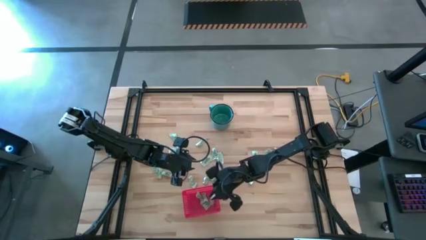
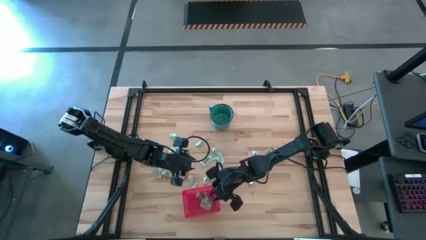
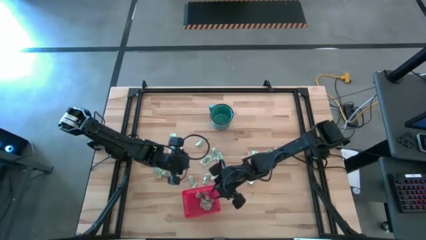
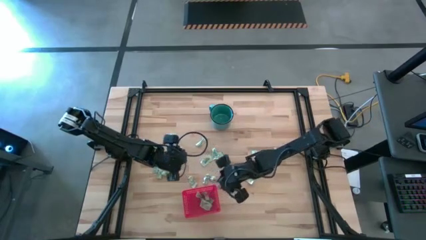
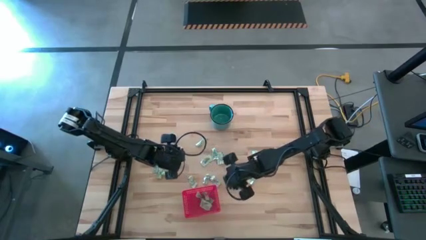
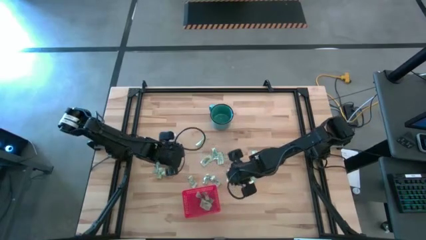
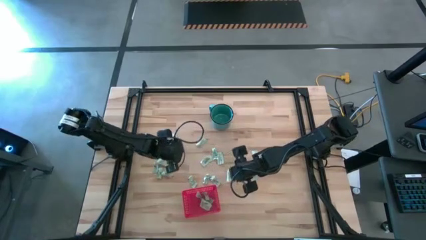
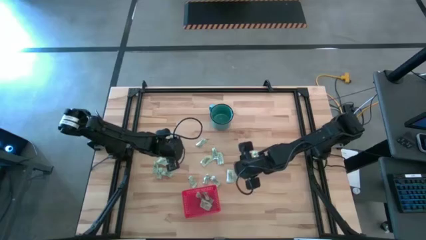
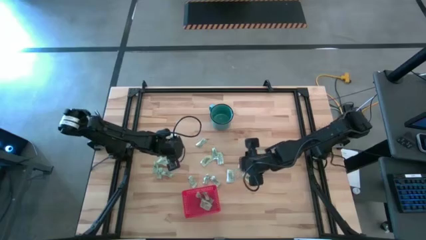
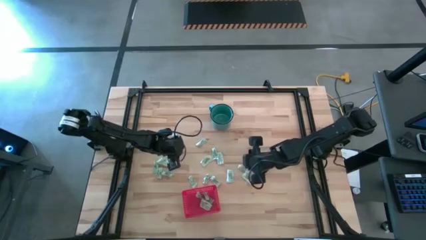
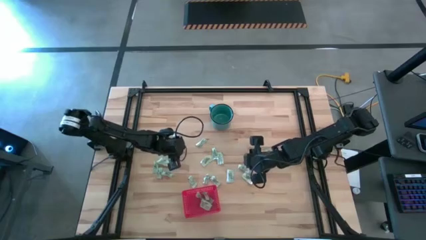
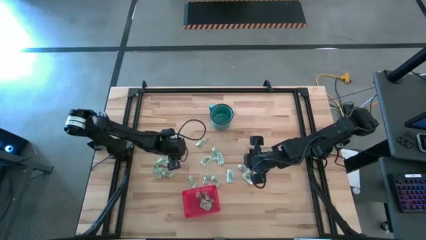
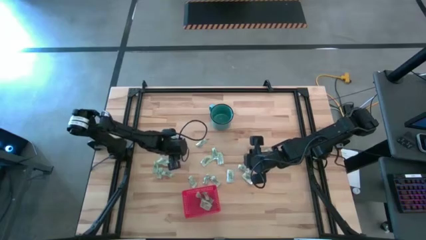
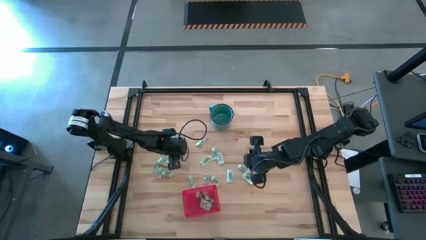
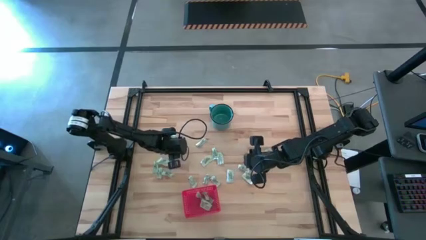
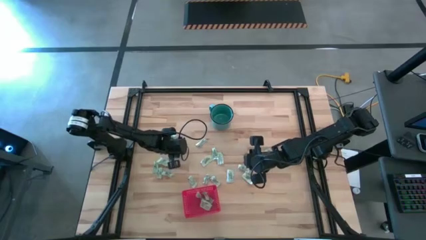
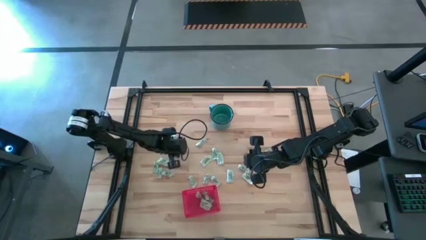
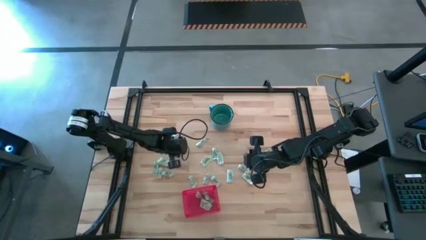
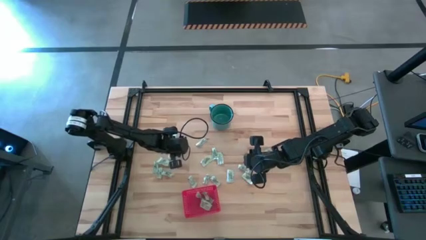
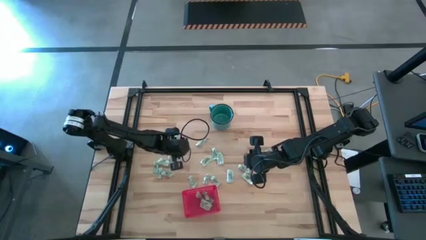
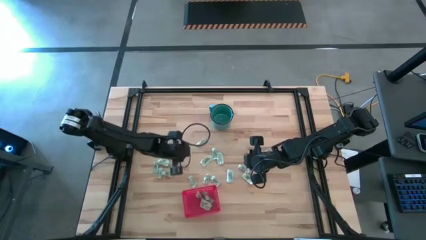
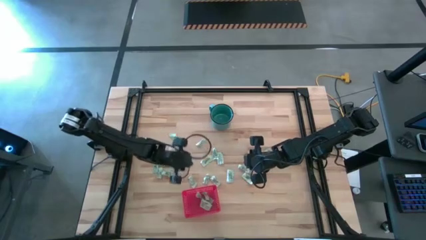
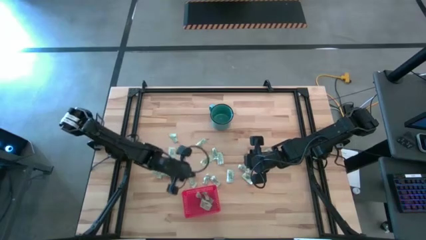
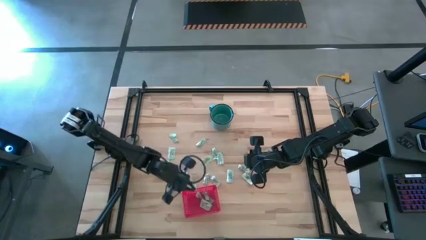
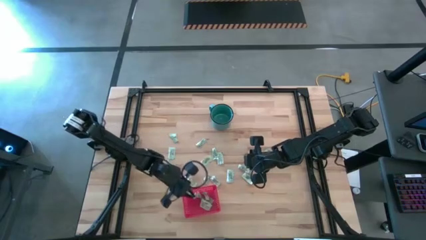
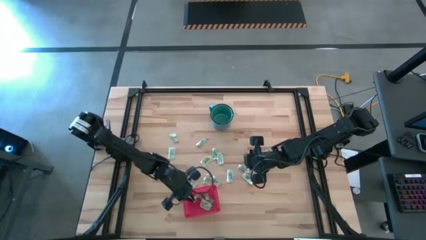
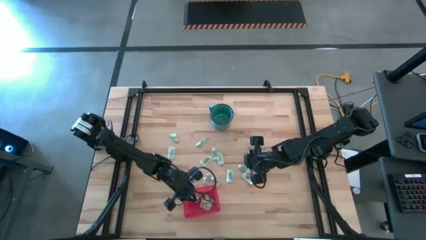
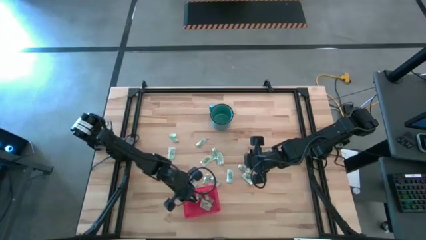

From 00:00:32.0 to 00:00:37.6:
Task: Pick and place items into bin
Put the green stevia packet into the red bin

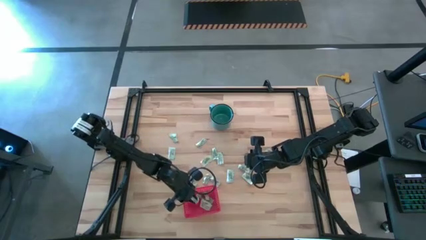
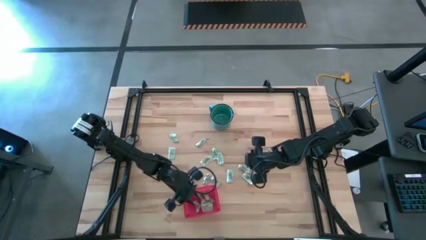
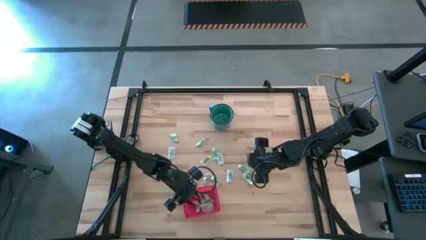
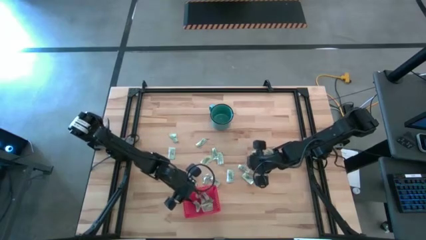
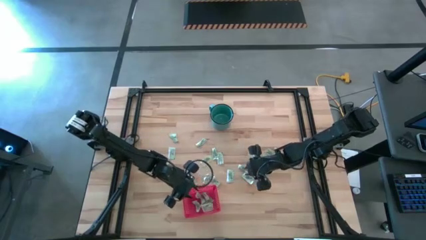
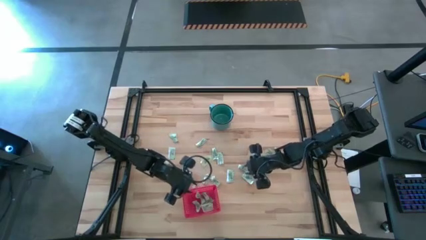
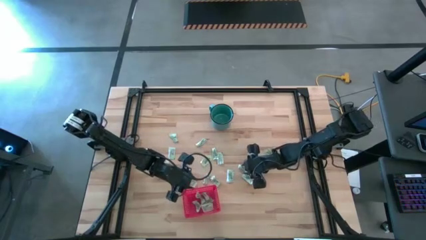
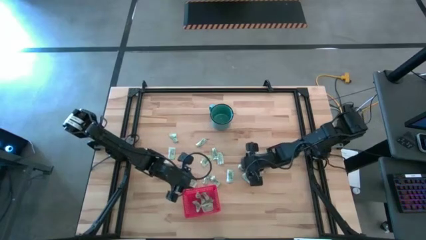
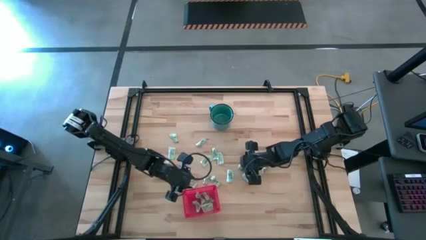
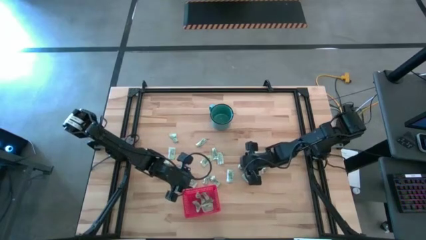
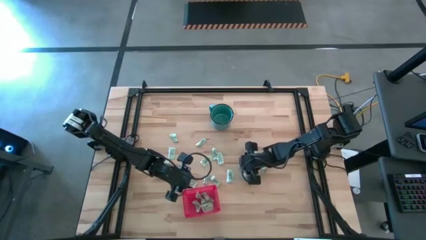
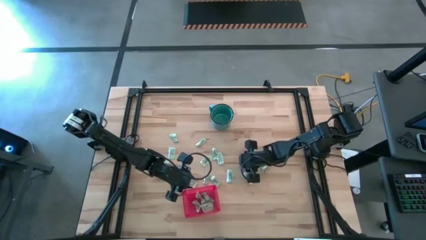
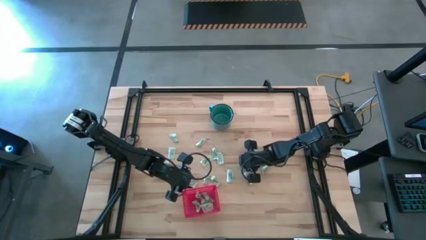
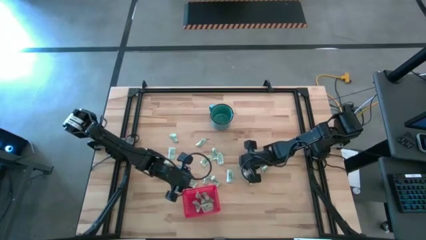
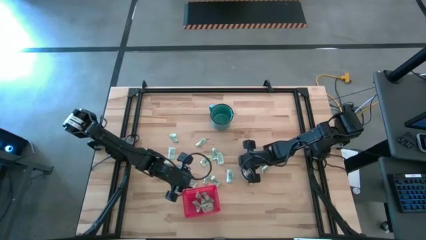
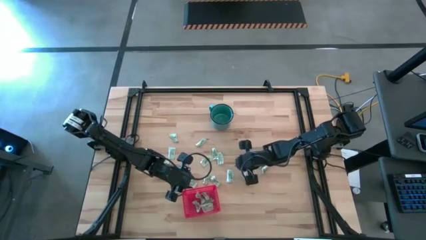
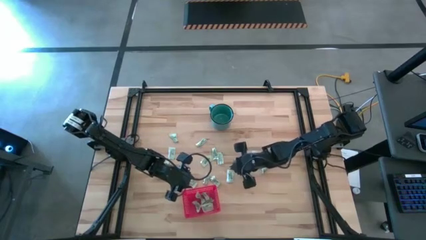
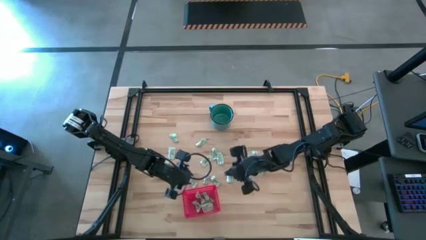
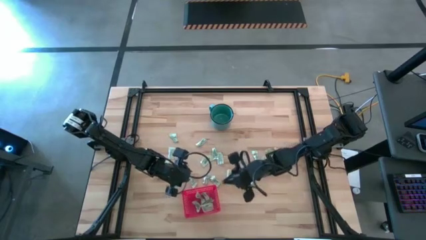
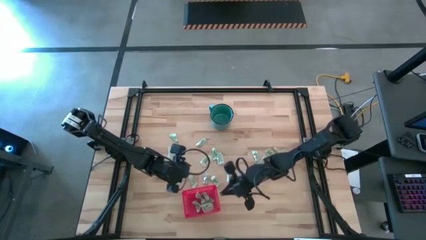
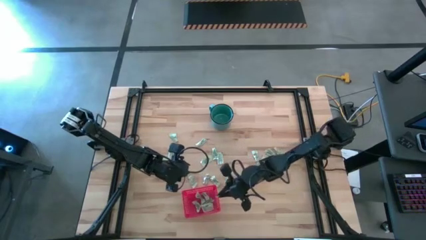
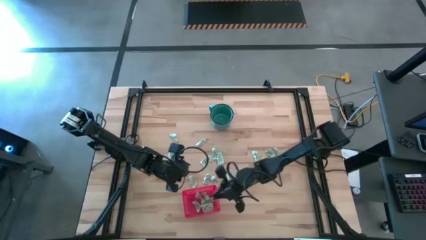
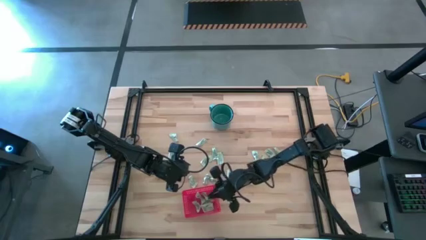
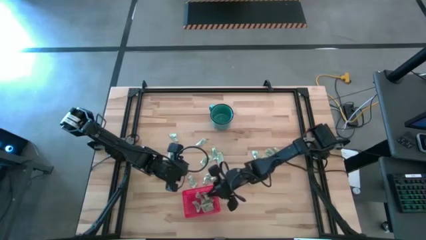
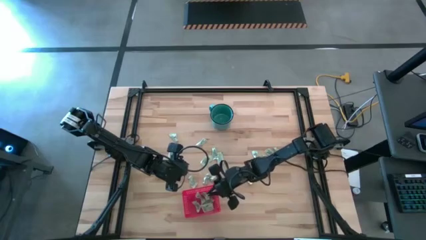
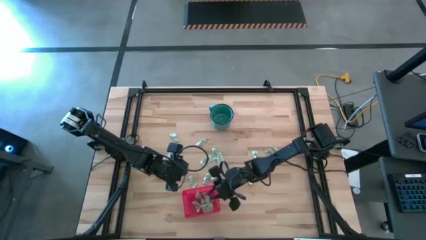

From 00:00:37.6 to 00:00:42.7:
Put the green stevia packet into the red bin

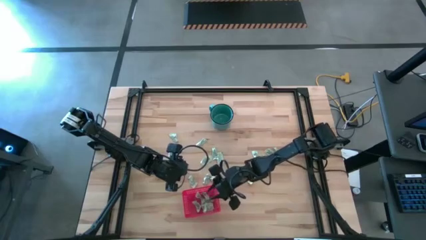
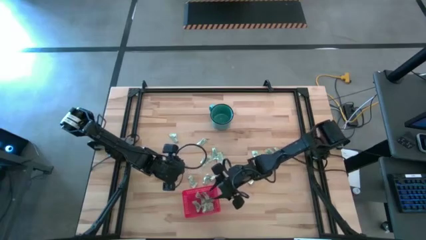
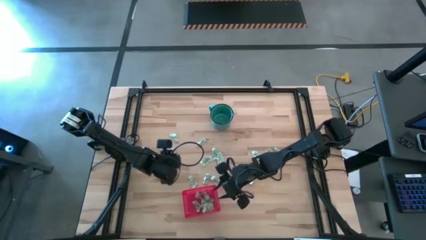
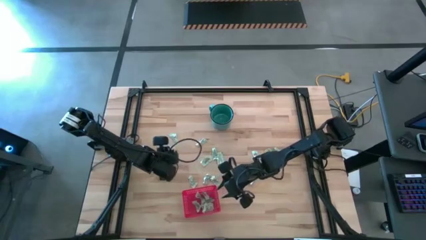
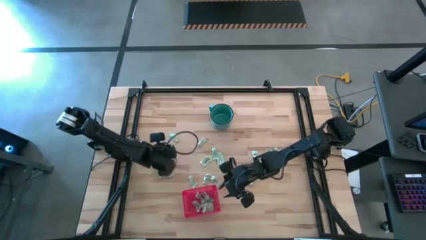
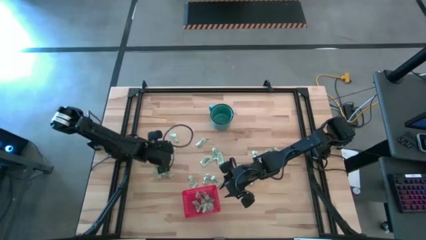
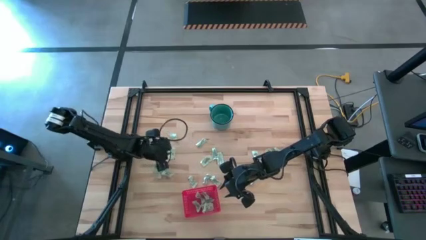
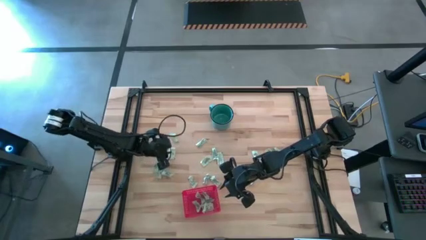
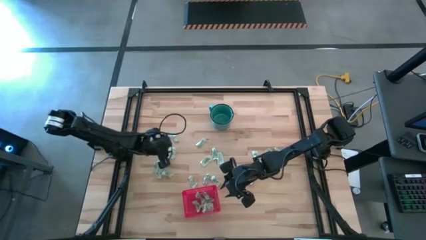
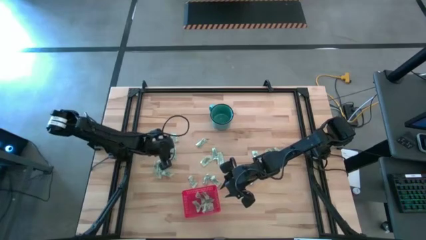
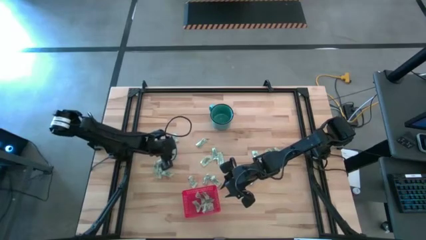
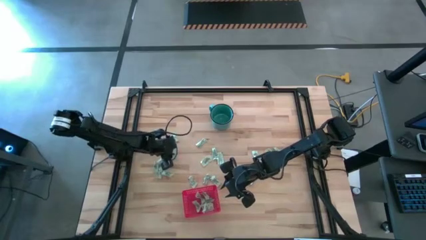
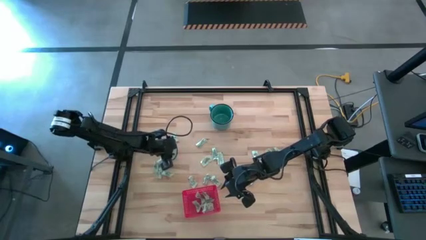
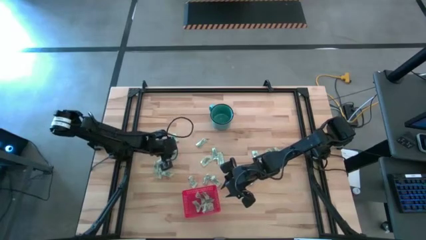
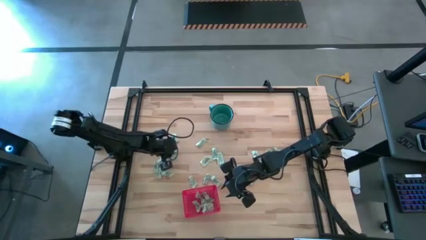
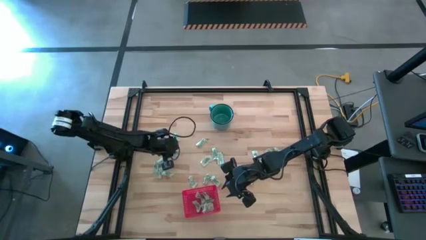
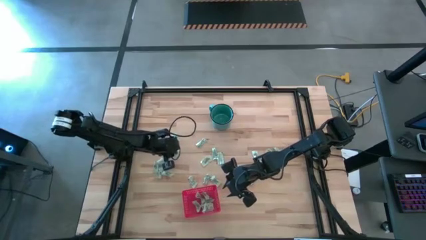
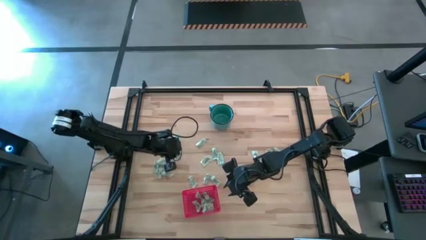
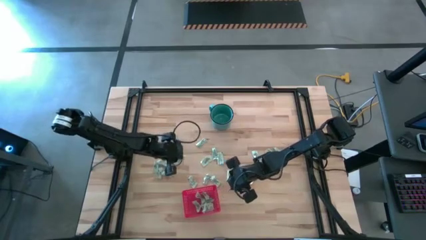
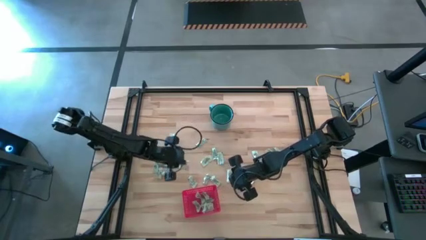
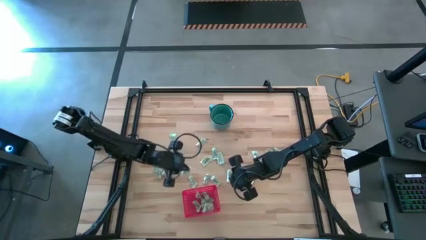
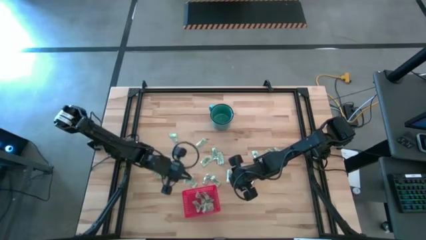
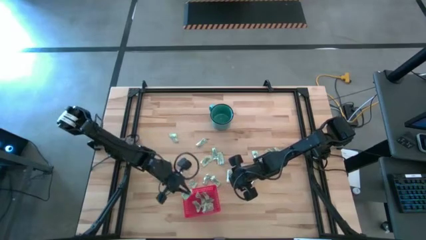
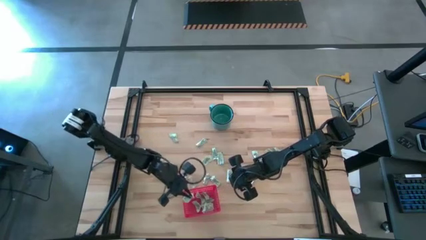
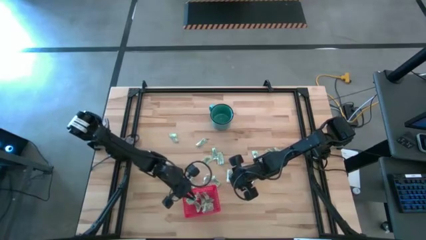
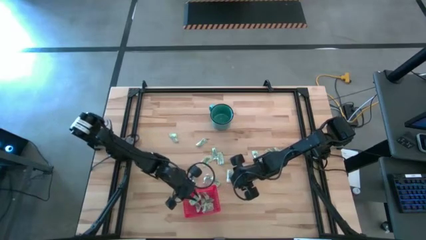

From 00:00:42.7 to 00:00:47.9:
Put the green stevia packet into the red bin

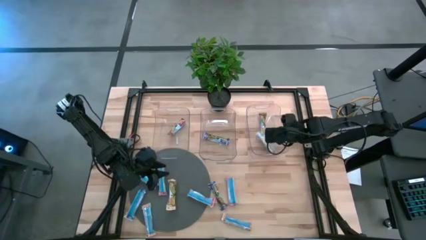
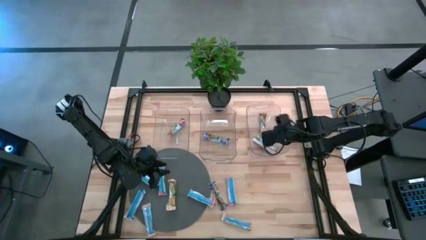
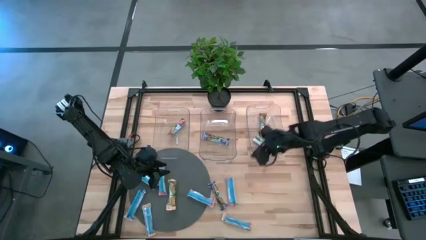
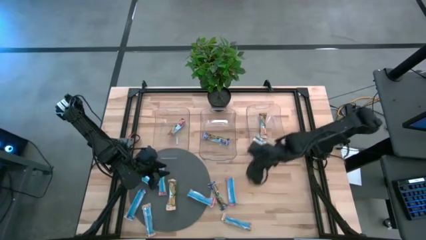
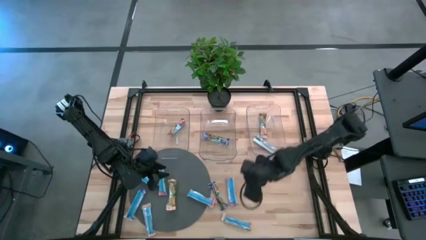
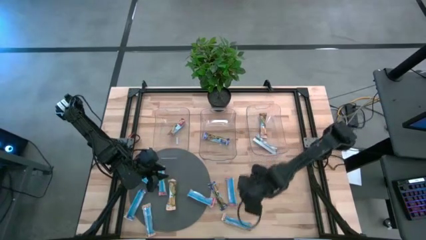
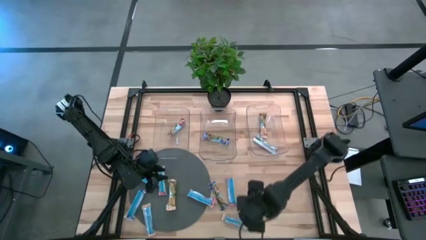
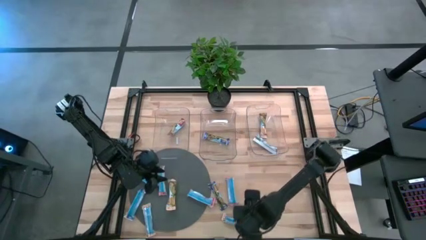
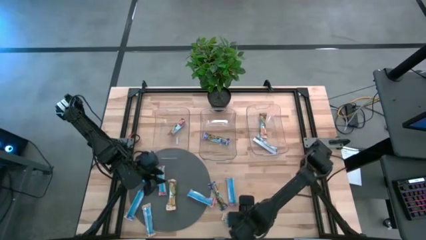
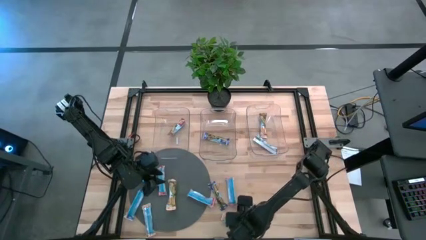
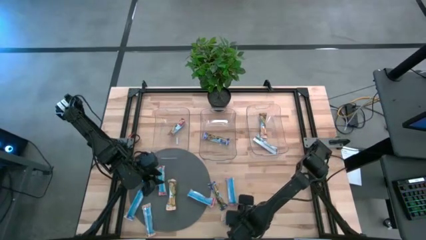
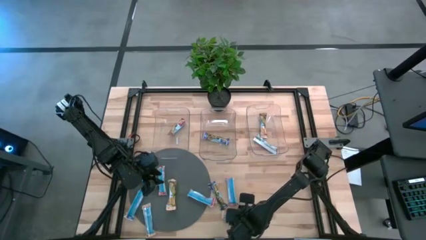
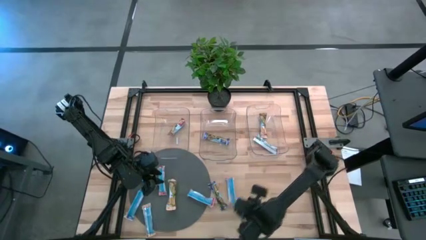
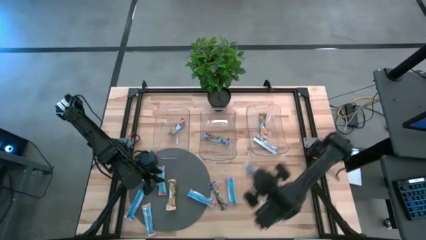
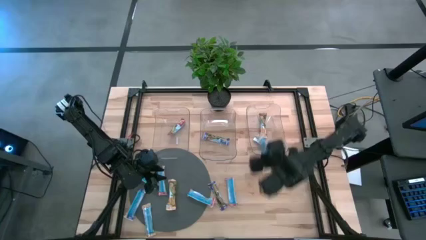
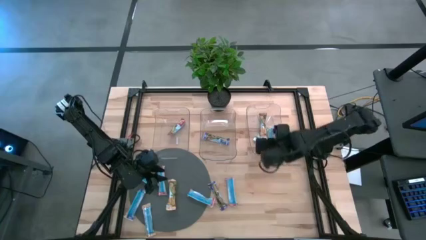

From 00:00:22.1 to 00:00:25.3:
Task: Pick and place Granola Bars by type
Put the yellow granola bar into the right transparent bin
